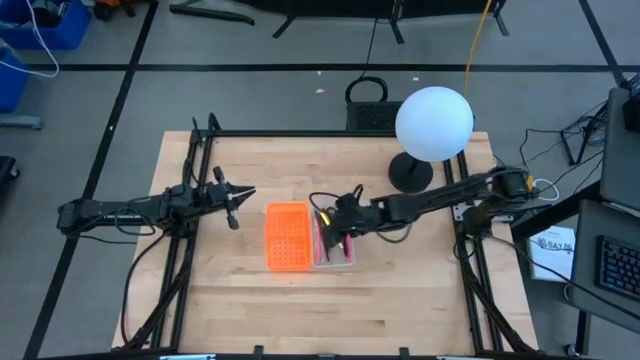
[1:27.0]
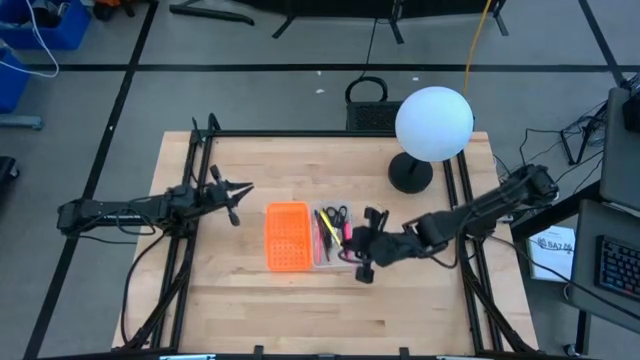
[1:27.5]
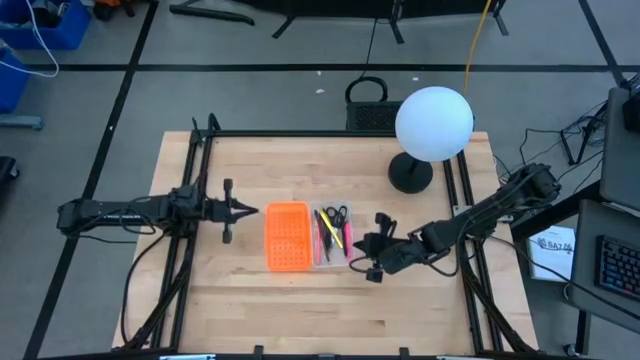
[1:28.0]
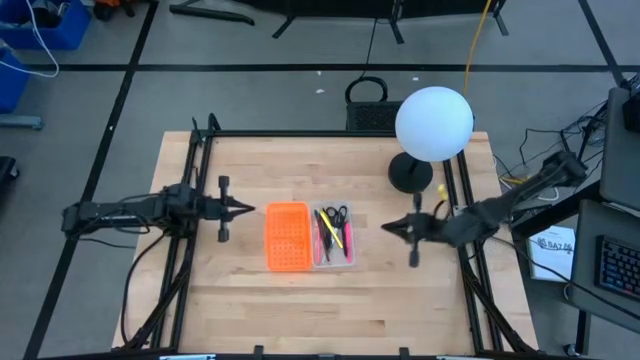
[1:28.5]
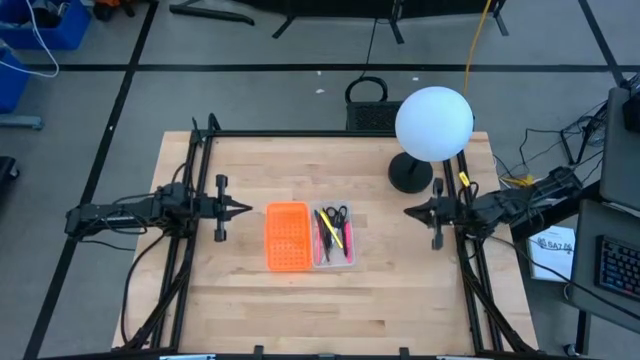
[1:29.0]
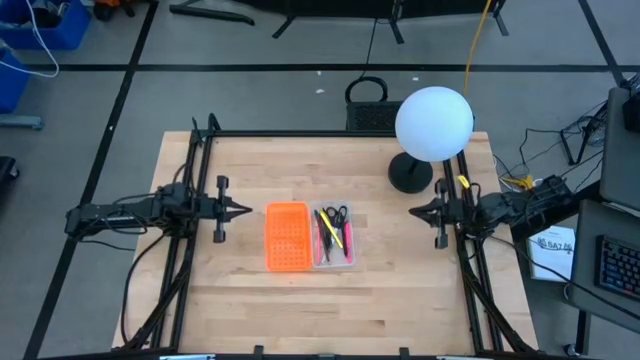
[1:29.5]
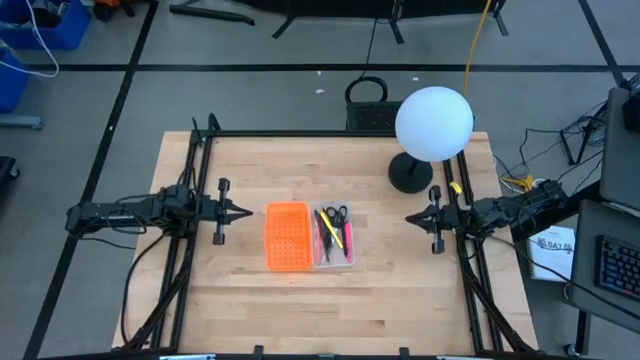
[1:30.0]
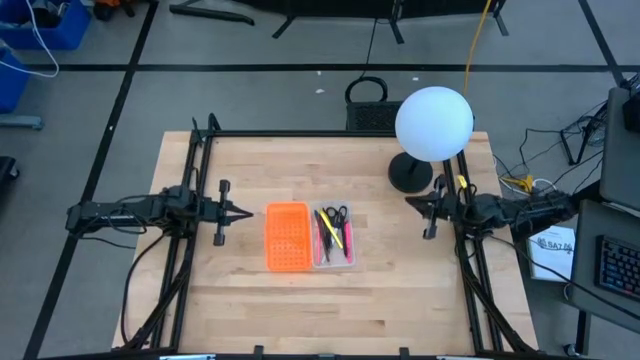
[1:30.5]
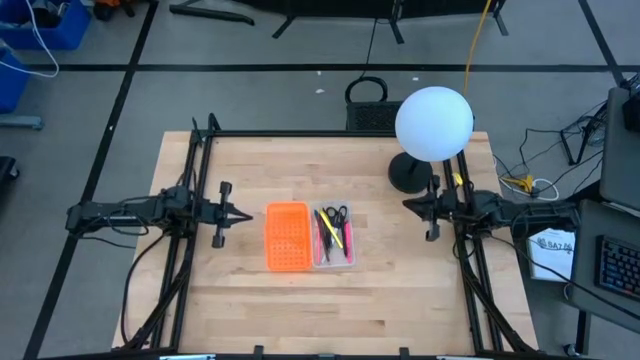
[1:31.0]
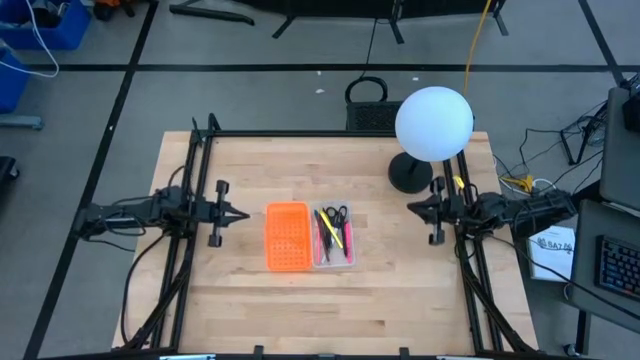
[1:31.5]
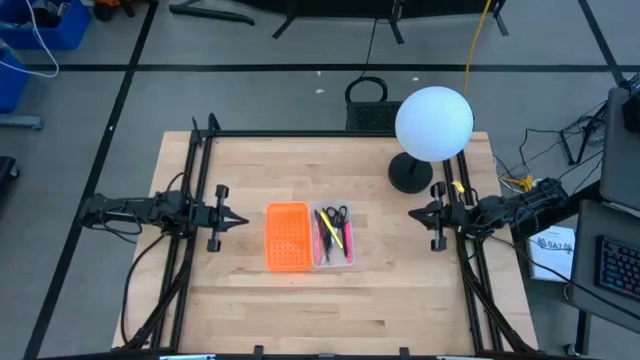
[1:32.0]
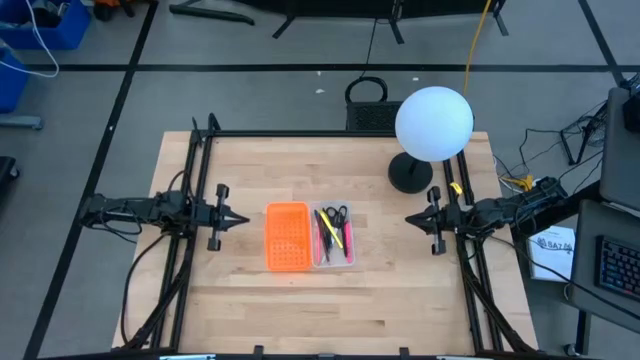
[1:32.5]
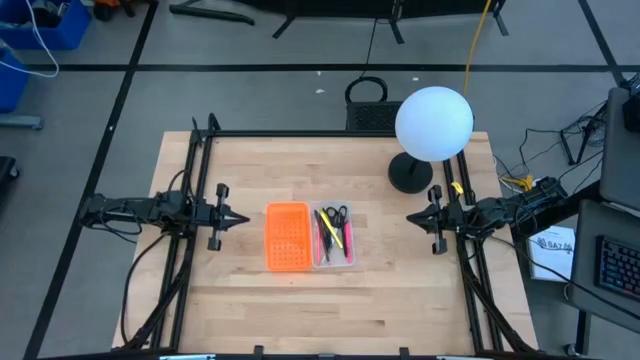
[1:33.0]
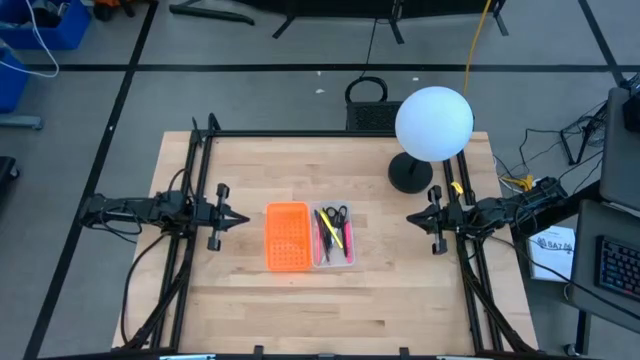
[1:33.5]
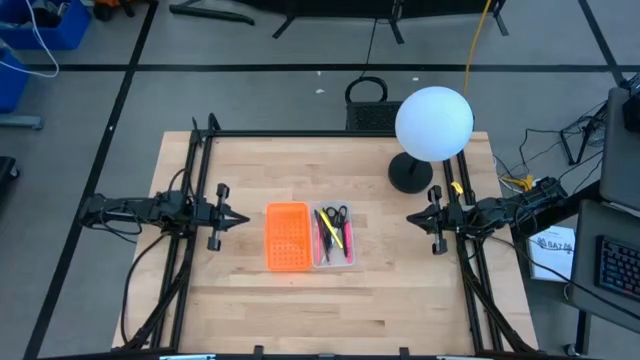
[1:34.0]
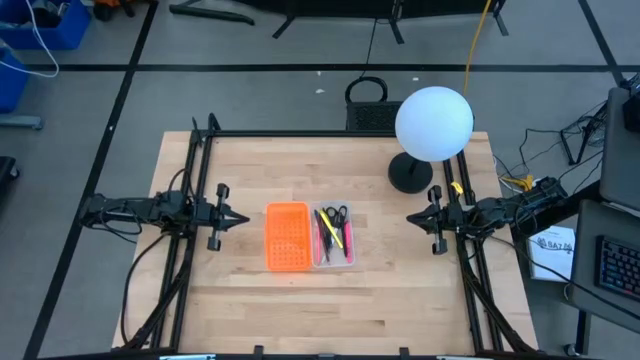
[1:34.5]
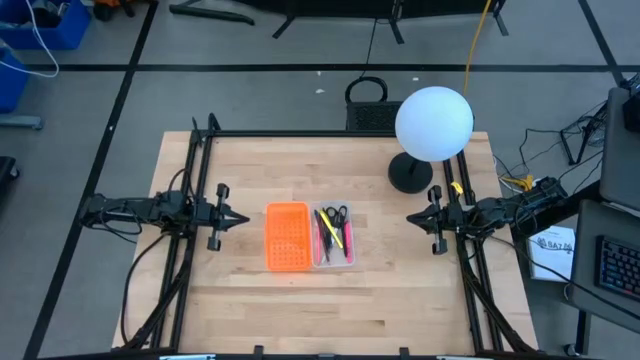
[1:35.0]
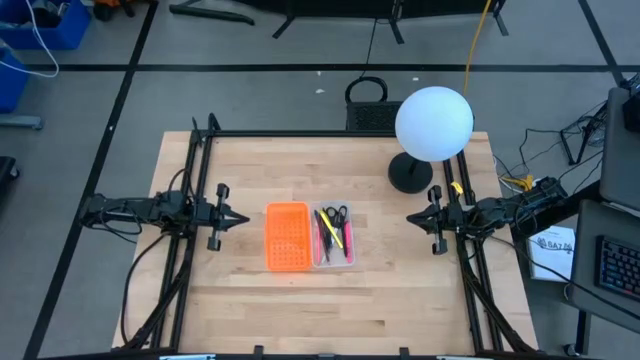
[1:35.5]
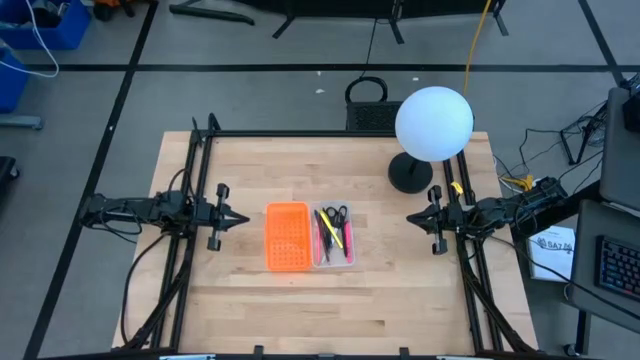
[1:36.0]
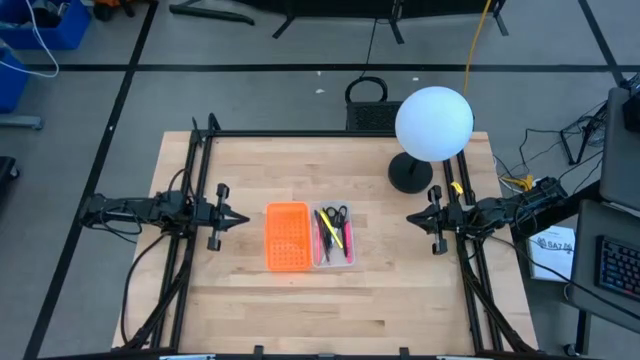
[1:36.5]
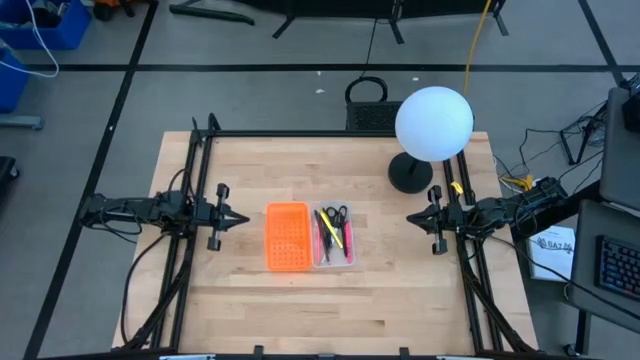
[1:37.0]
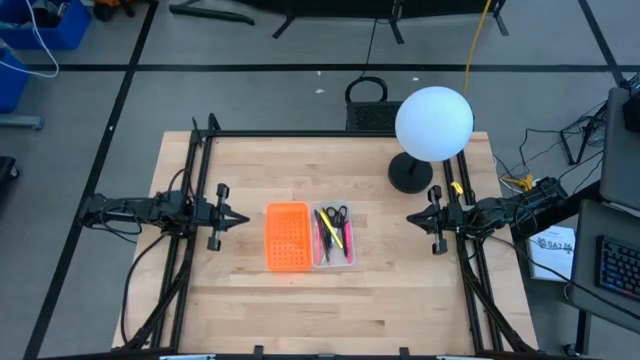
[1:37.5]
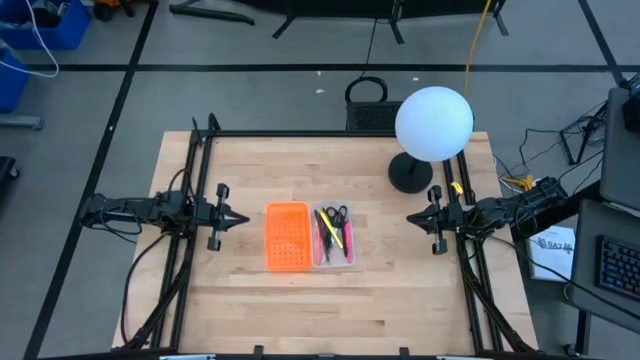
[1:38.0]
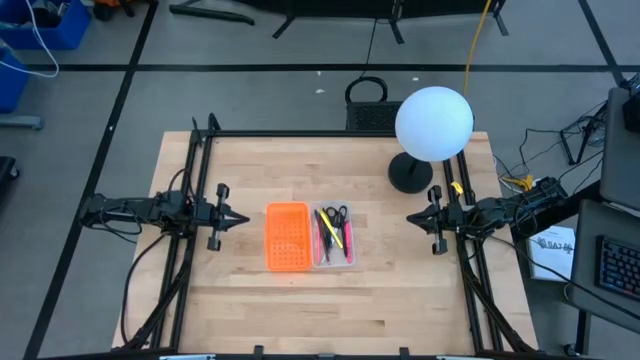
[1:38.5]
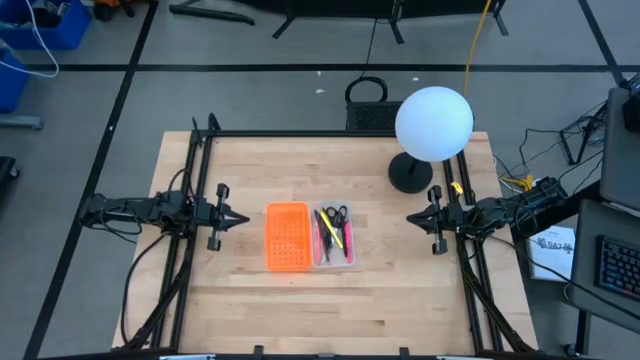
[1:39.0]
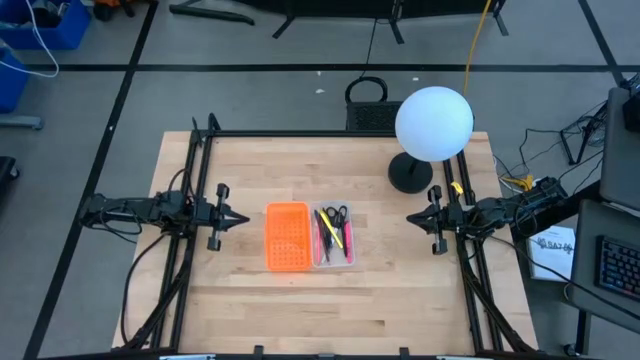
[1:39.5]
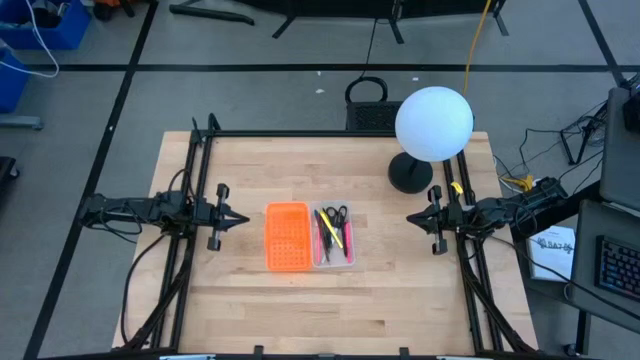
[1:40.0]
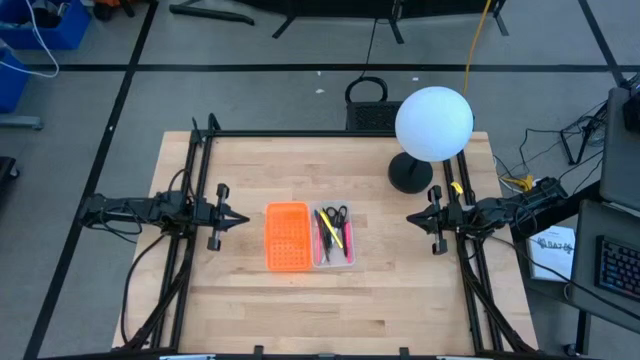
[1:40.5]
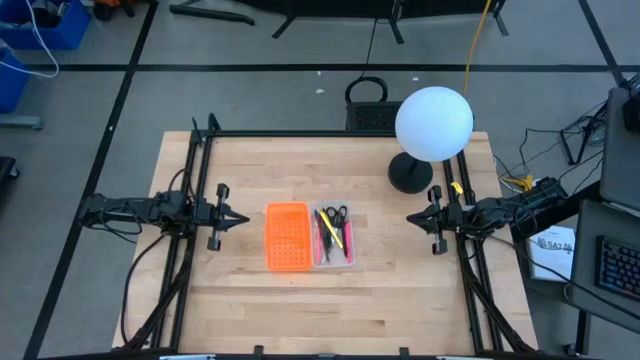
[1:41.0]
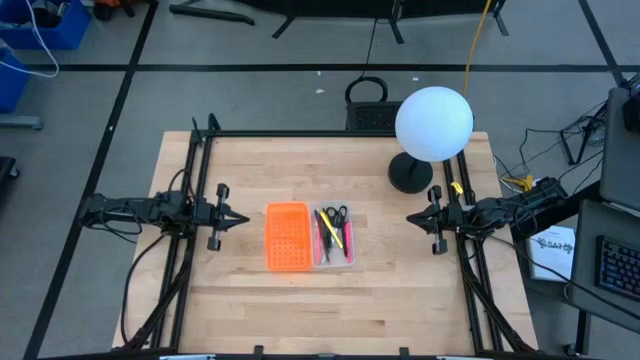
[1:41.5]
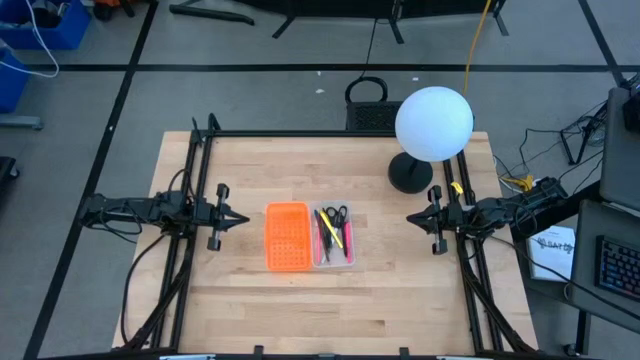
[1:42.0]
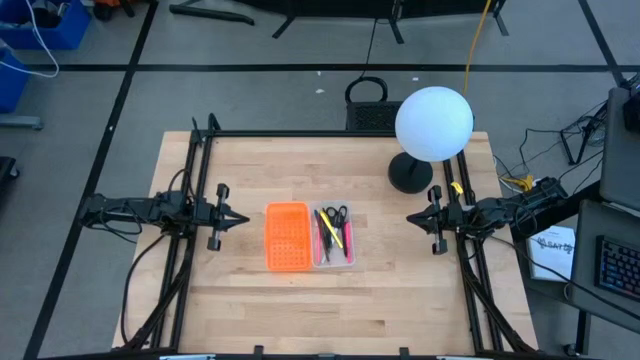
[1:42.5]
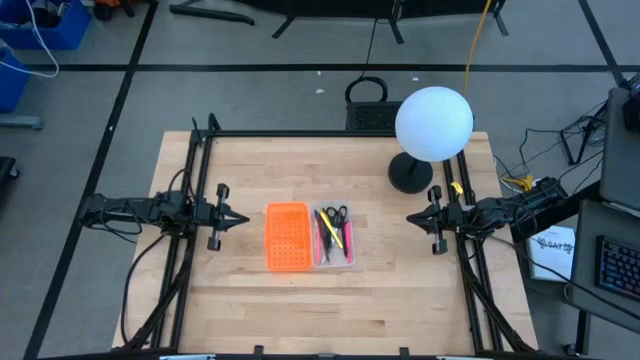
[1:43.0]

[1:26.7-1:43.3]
Task: Pick & place school supplies into a supply box
Return to Home Position

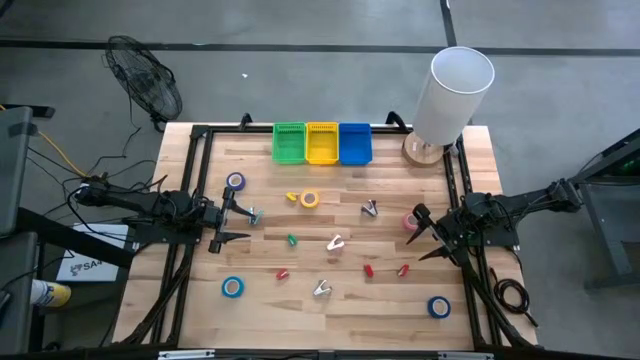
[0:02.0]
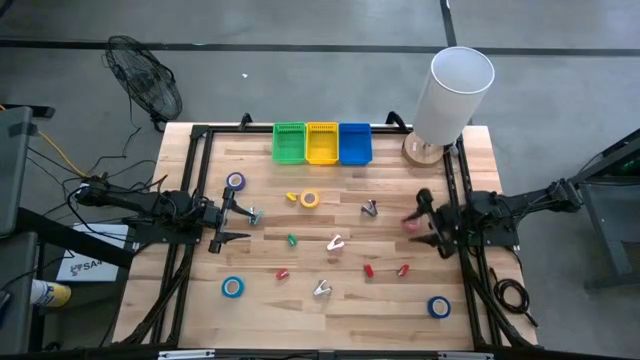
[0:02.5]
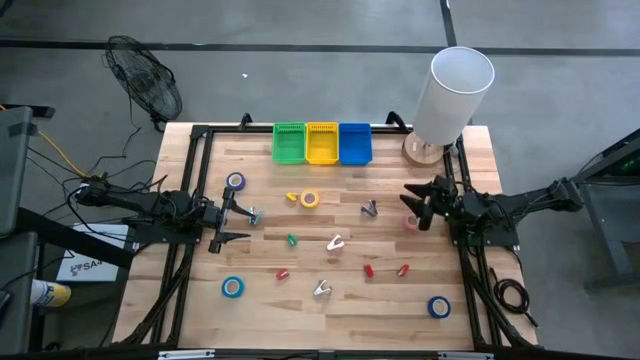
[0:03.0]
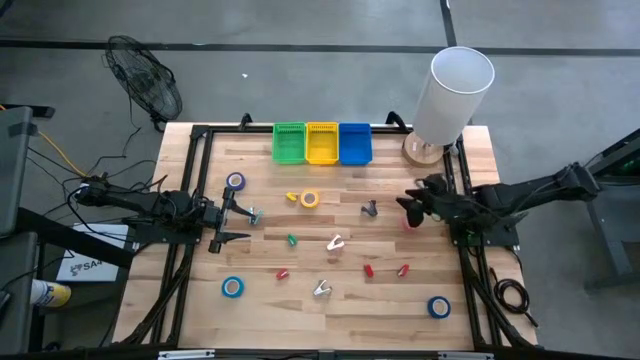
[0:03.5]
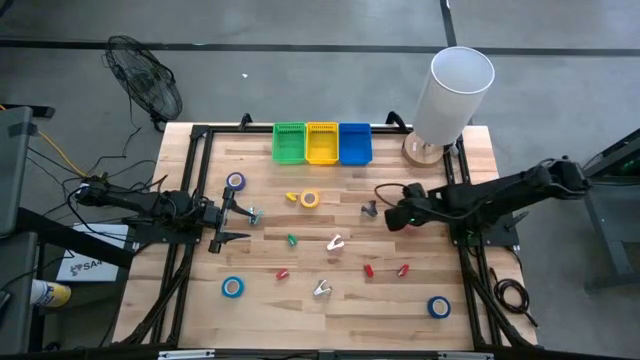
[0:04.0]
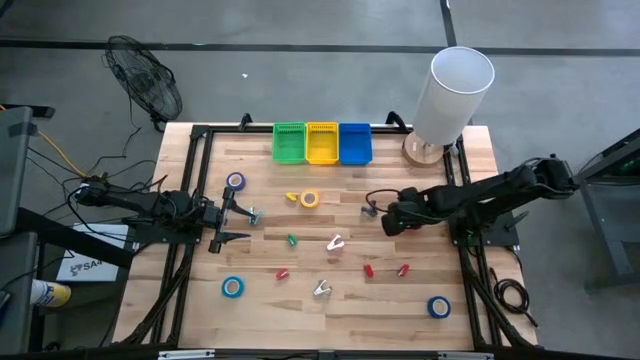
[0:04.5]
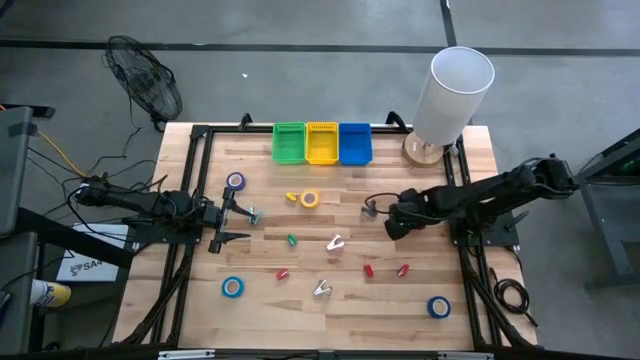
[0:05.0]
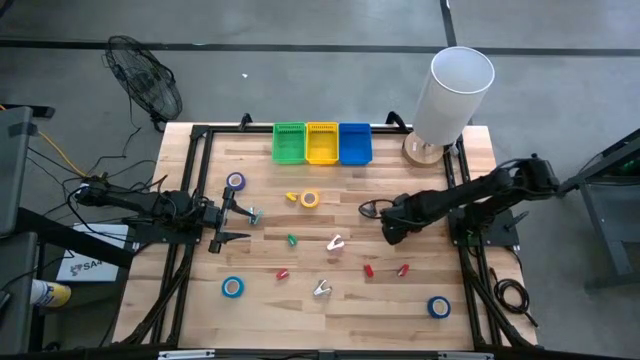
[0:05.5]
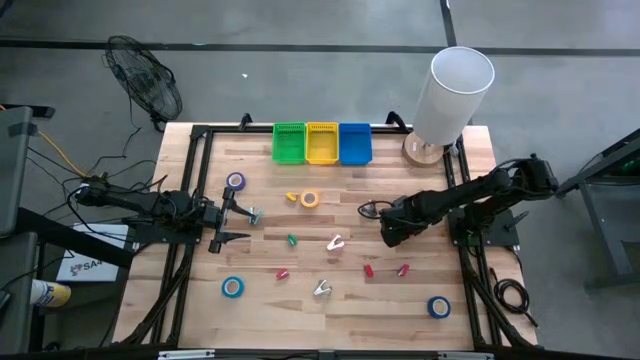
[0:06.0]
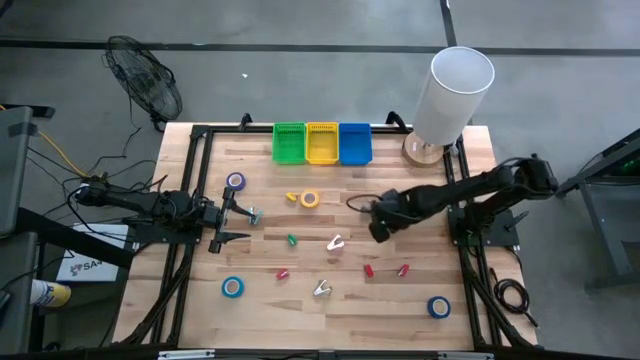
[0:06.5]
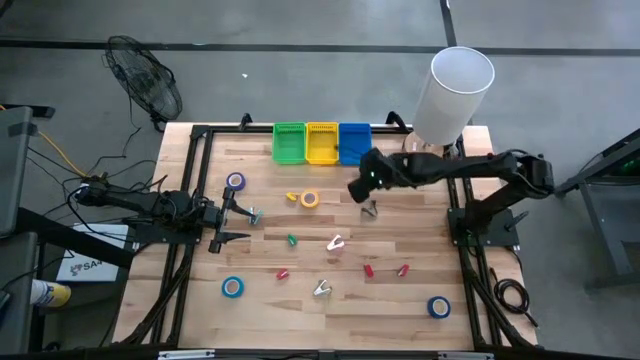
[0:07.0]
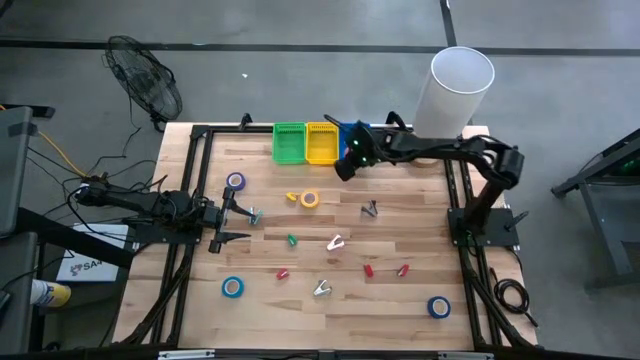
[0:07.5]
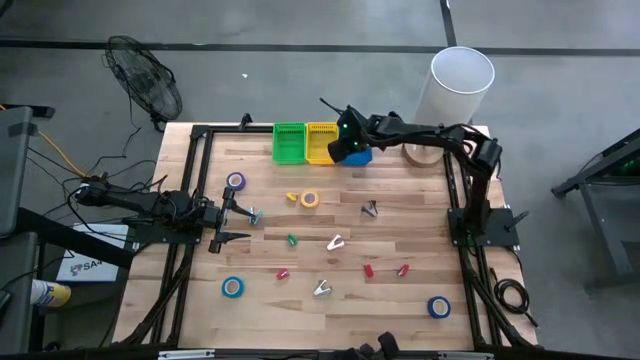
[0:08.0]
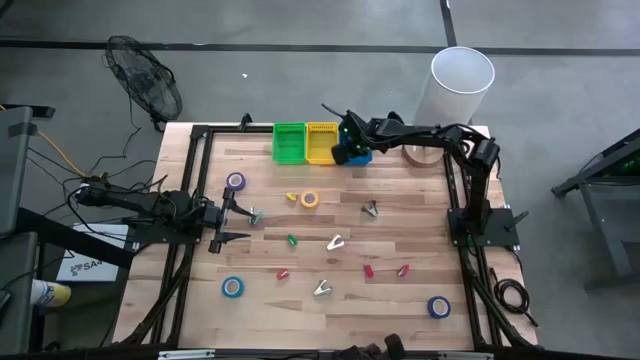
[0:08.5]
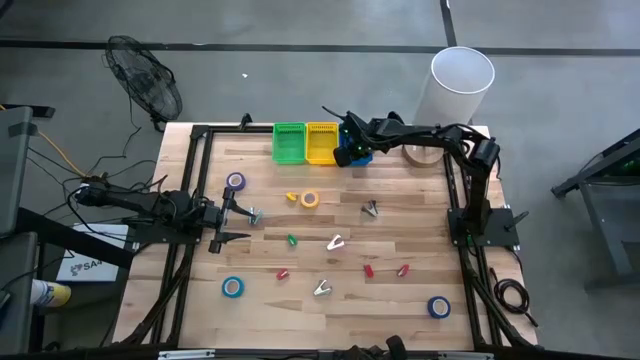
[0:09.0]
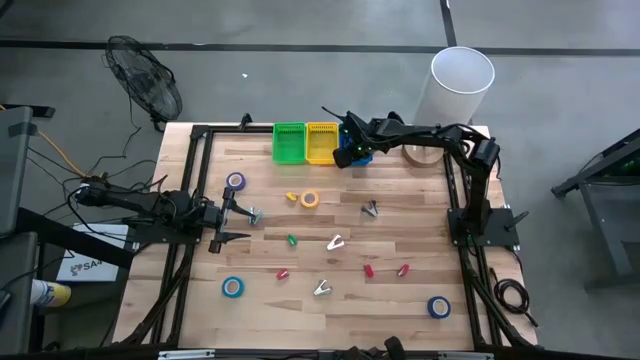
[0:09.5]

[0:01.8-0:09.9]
Task: Pick and place Stapler, Stapler remover, tape
Put the pink tape into the blue bin
